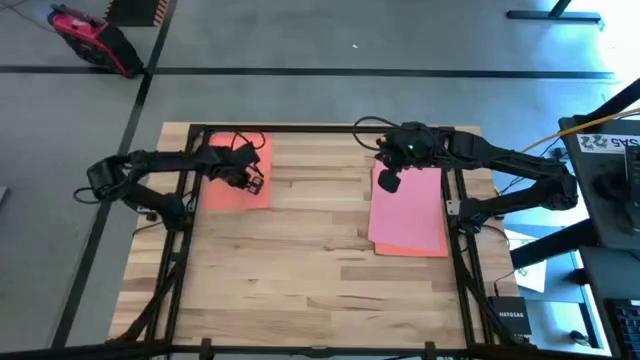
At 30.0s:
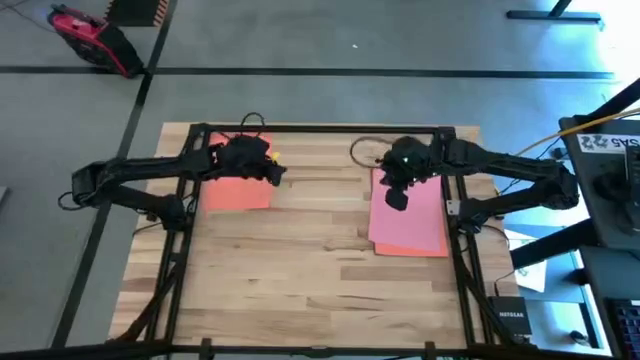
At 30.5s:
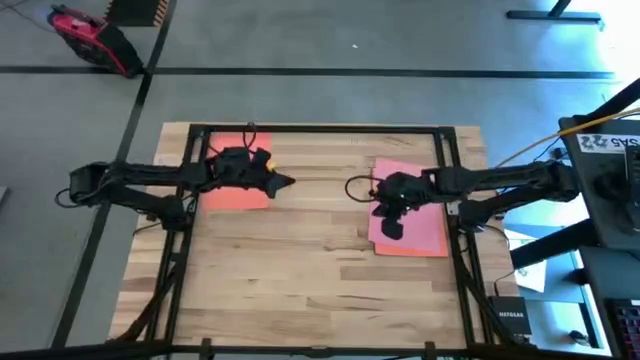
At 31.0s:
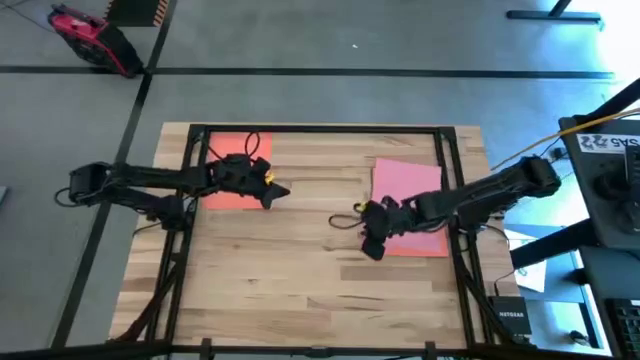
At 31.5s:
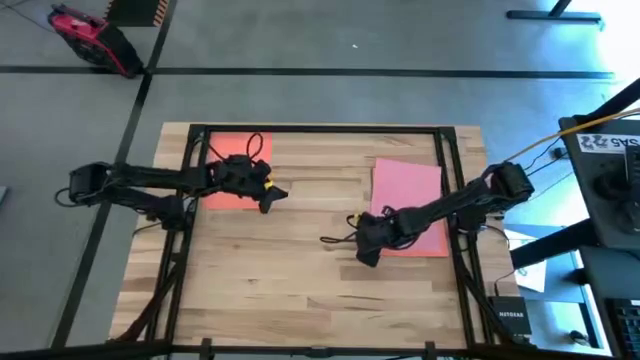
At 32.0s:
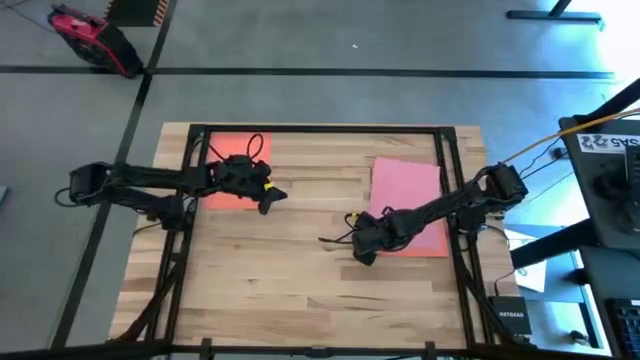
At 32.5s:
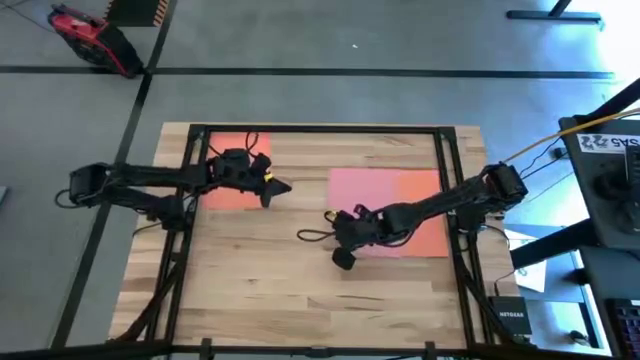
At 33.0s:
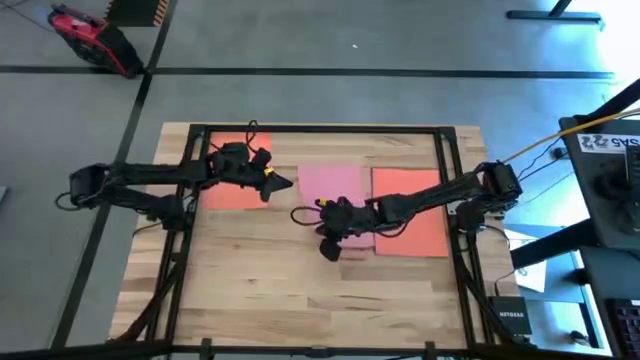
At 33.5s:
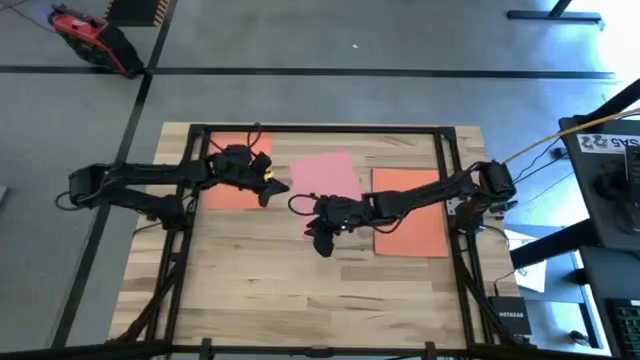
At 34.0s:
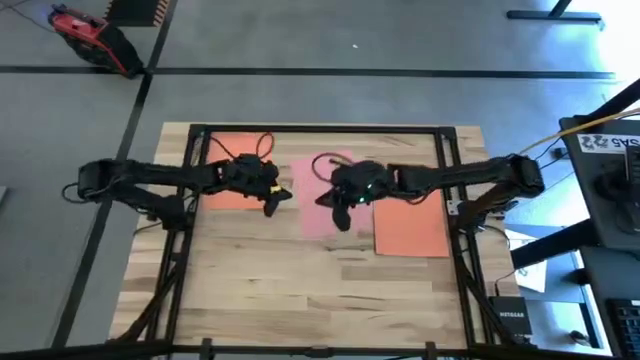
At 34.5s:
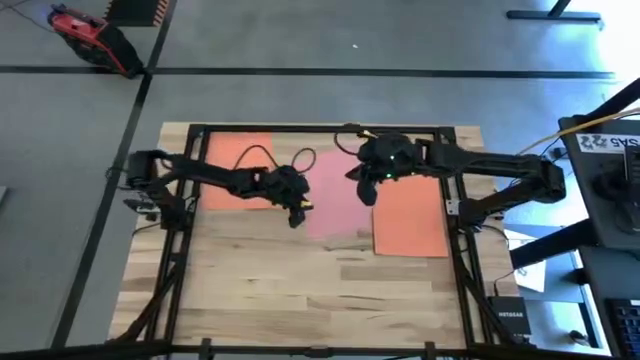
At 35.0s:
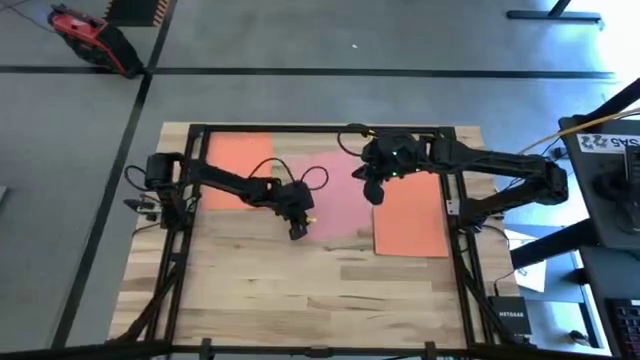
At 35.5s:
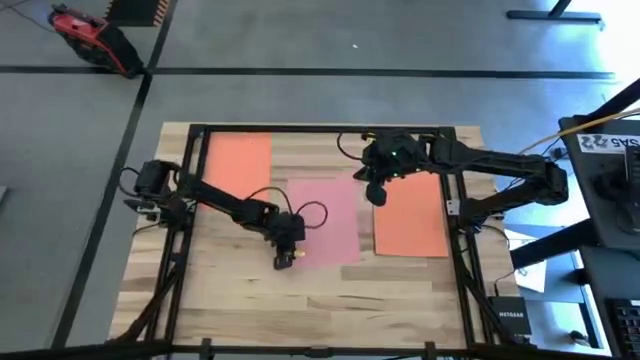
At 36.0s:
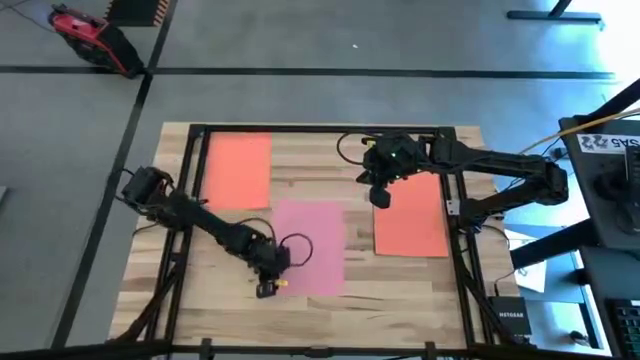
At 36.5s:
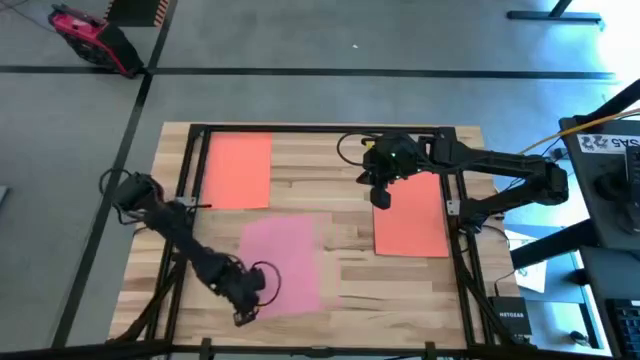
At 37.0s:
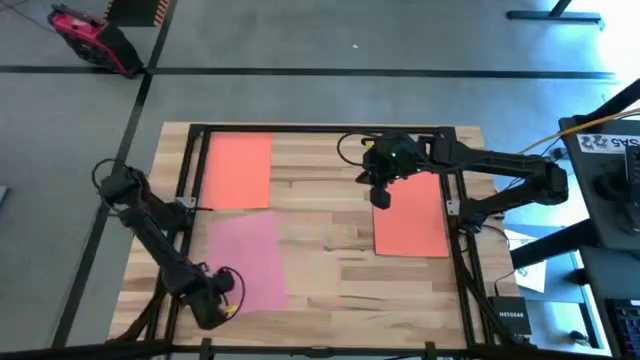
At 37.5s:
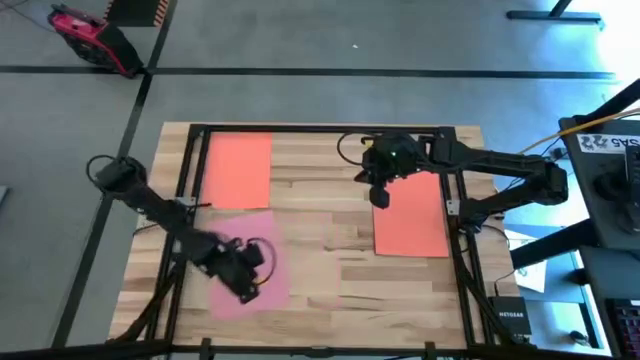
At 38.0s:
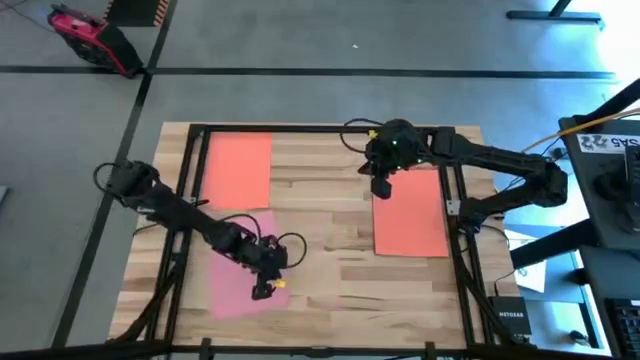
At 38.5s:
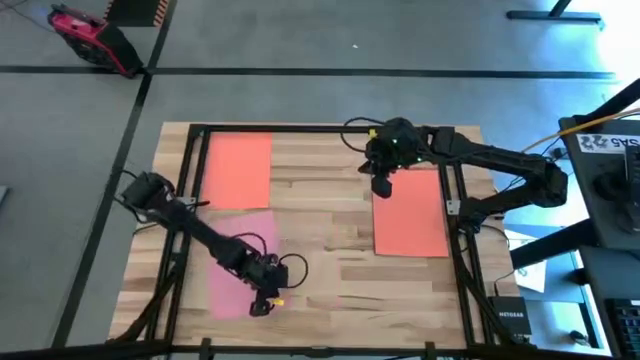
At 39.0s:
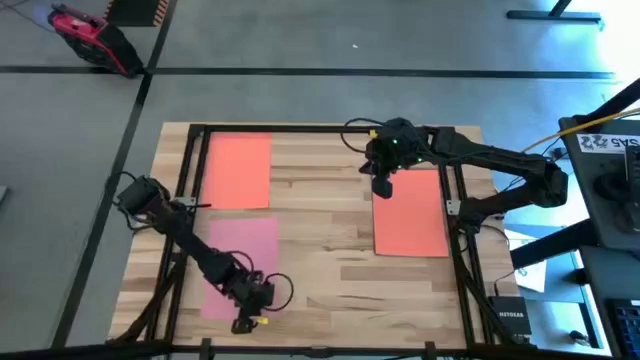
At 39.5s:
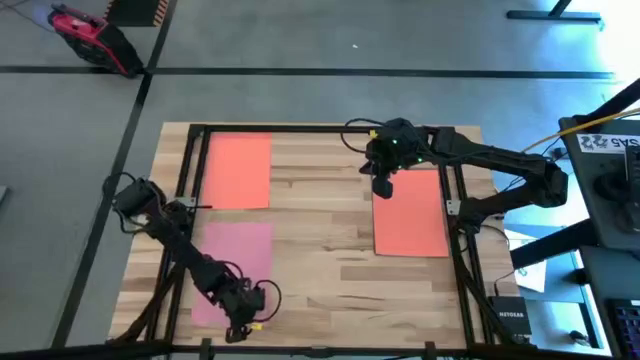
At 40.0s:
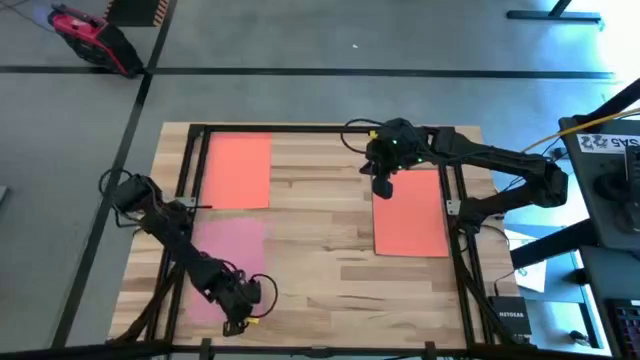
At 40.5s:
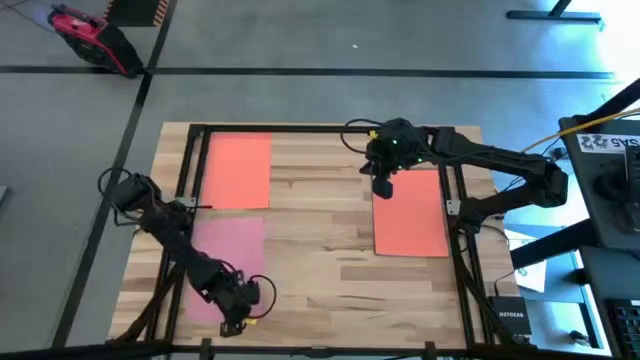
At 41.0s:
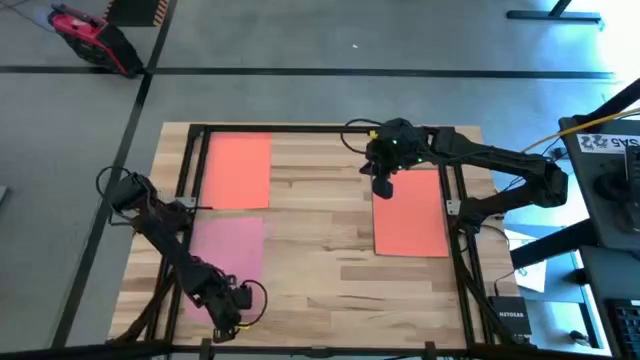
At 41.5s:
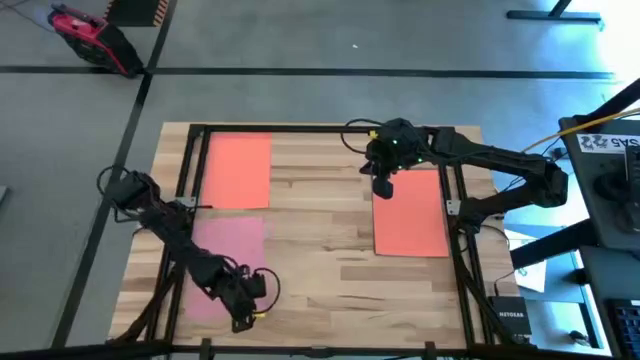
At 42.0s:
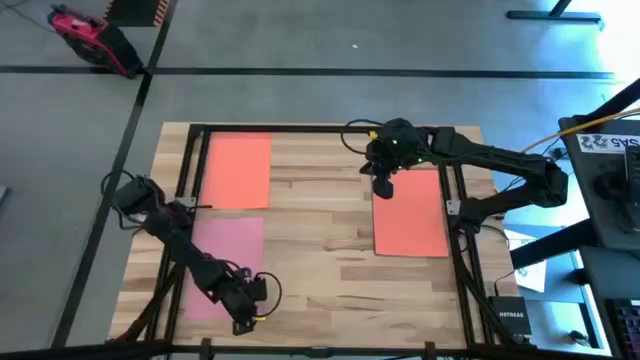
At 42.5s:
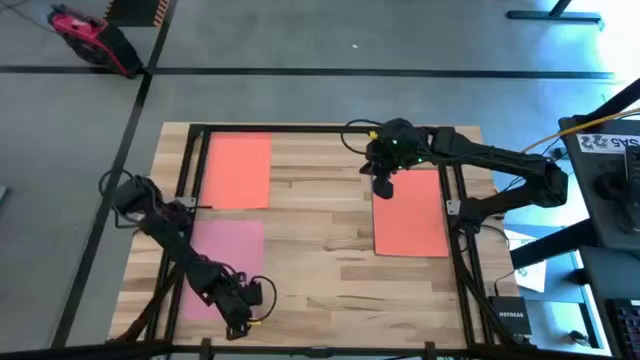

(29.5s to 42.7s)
Task: Organize paper
Move the pink color paper to the bottom left of the table

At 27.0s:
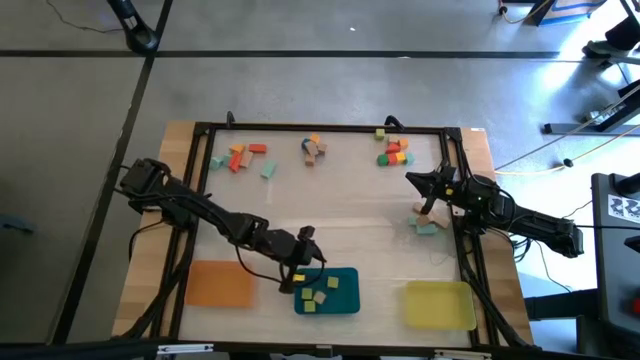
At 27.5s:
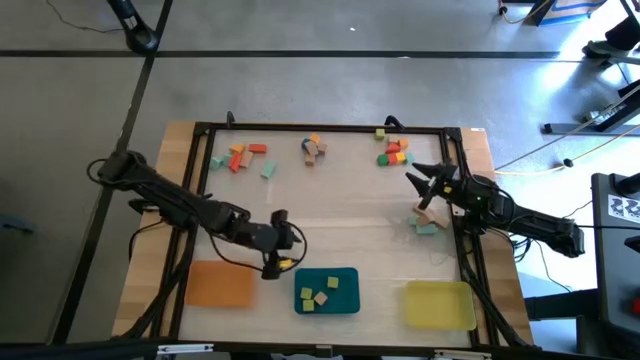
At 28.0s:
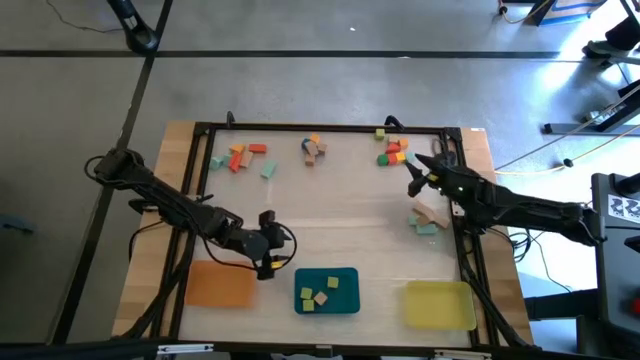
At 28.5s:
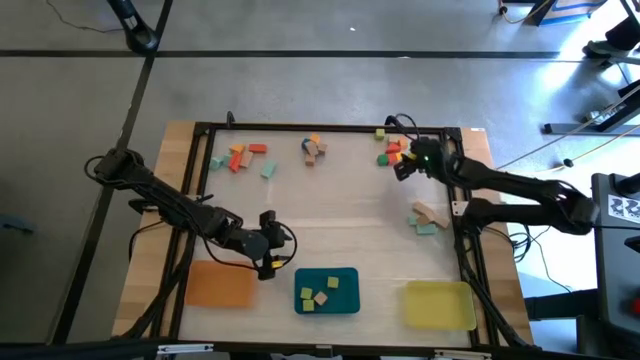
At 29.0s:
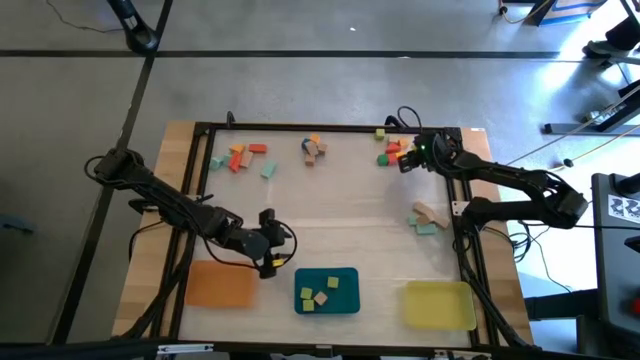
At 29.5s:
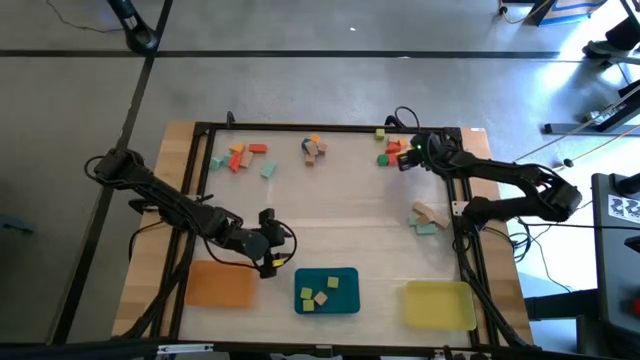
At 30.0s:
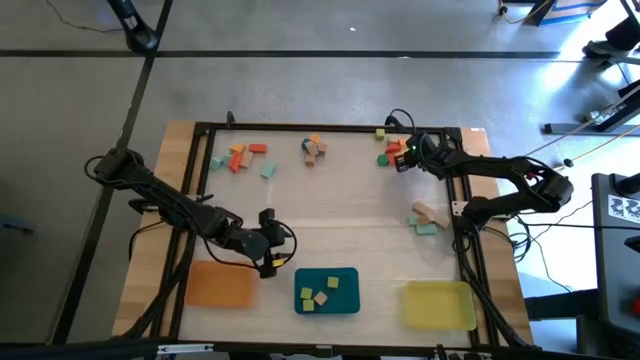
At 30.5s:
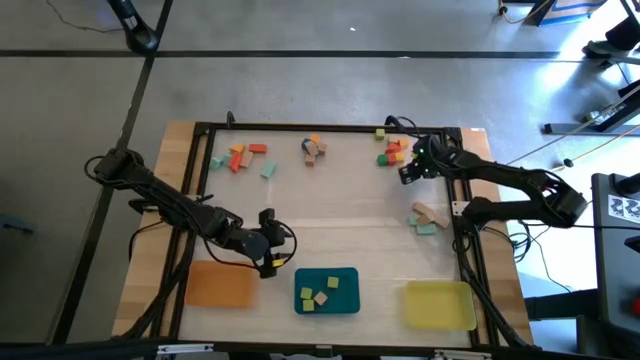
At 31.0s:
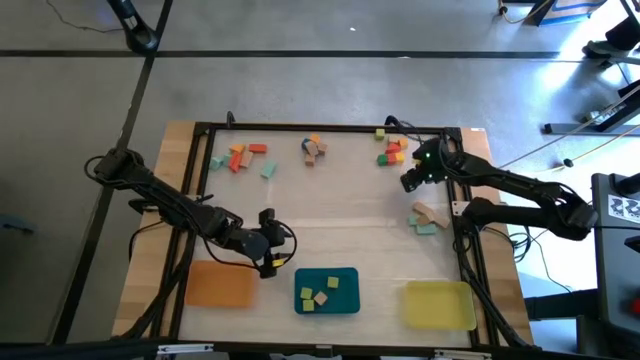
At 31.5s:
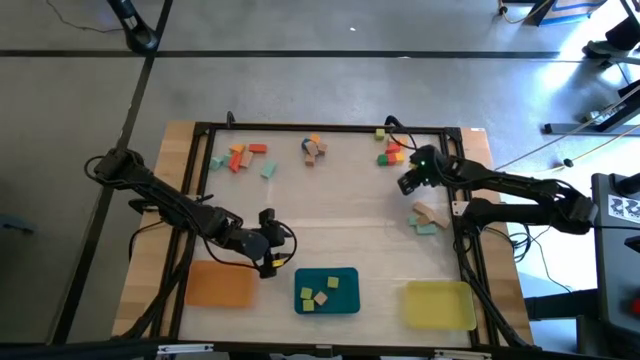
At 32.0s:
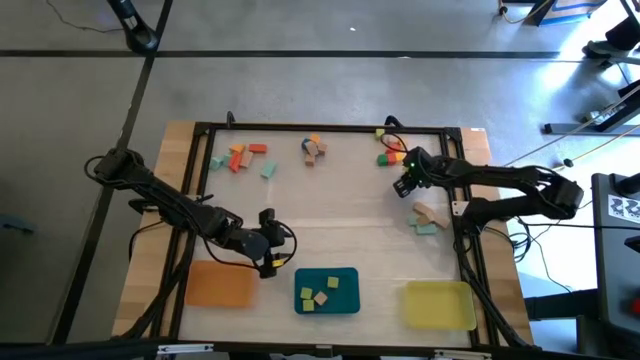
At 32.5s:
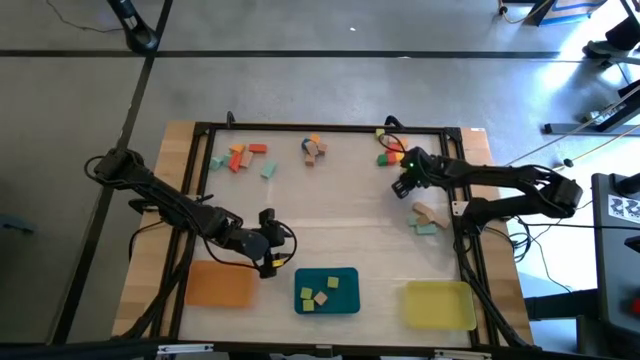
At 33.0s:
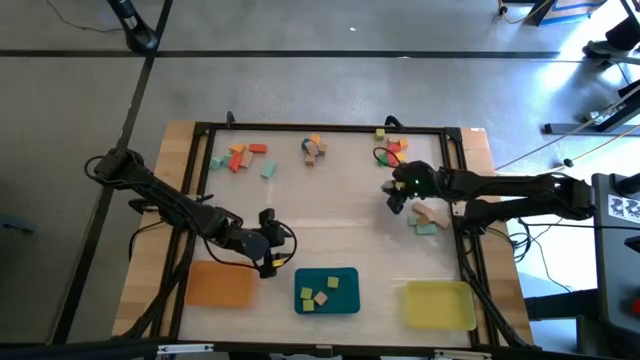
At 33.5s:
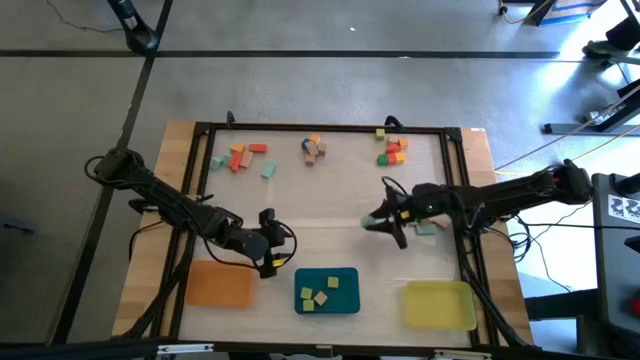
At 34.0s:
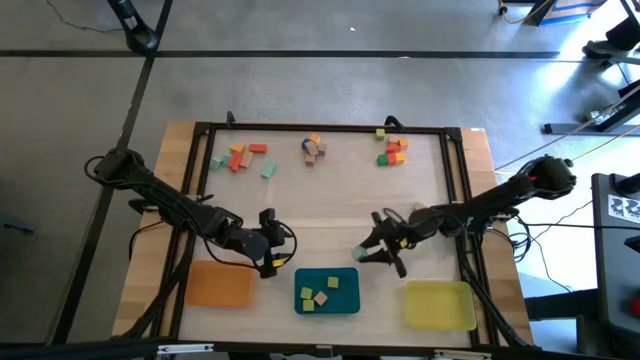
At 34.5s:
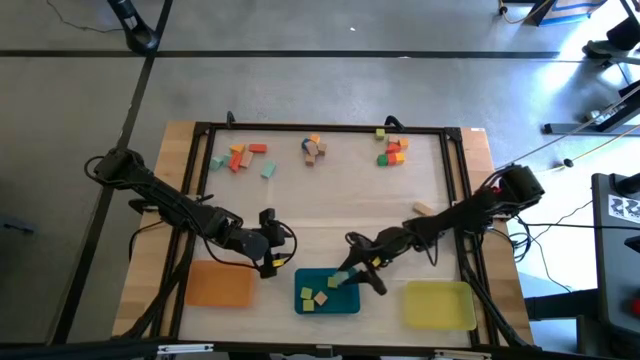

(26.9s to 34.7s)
Task: Sort blocks by size
Put the light blue cube block into the blue bin
